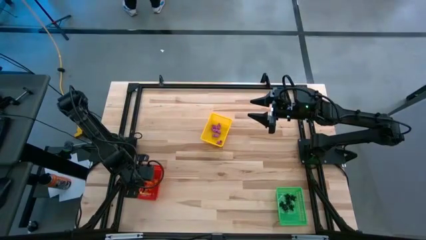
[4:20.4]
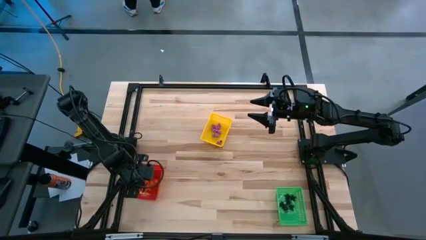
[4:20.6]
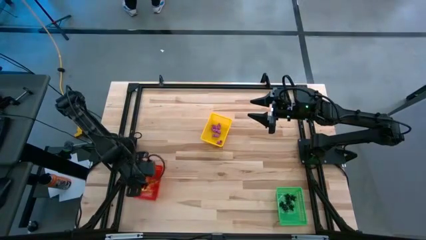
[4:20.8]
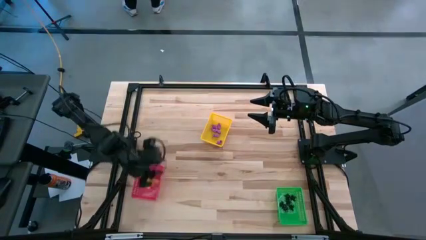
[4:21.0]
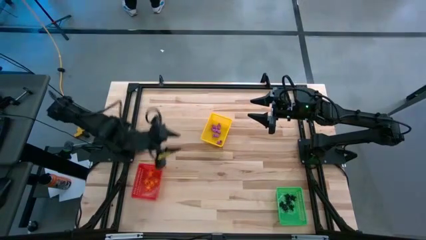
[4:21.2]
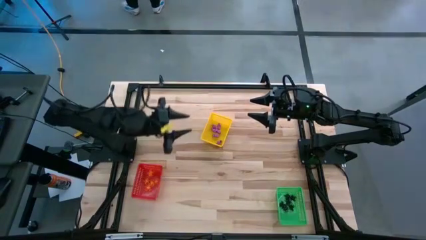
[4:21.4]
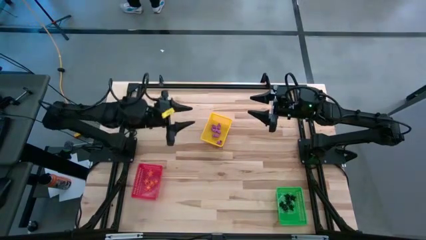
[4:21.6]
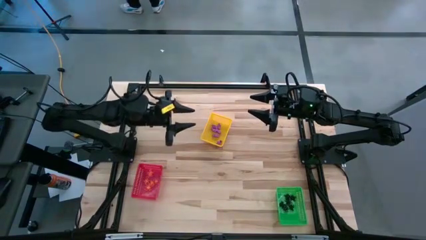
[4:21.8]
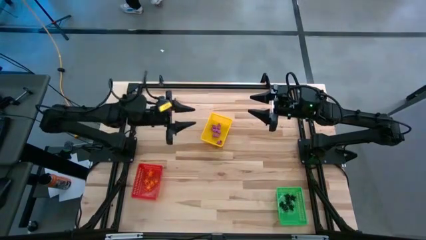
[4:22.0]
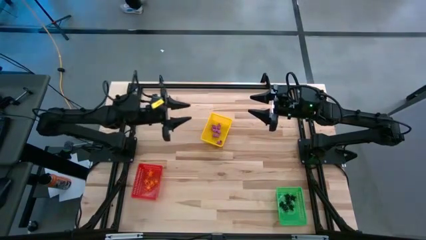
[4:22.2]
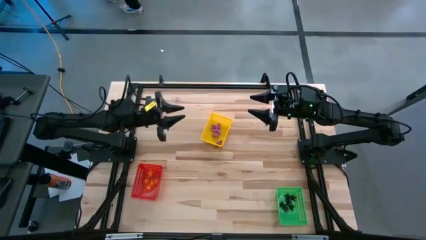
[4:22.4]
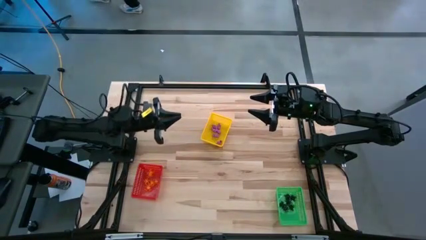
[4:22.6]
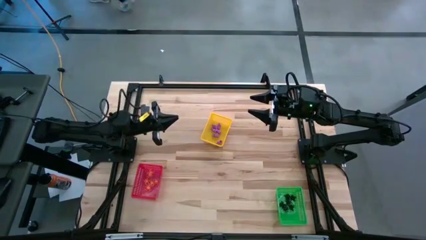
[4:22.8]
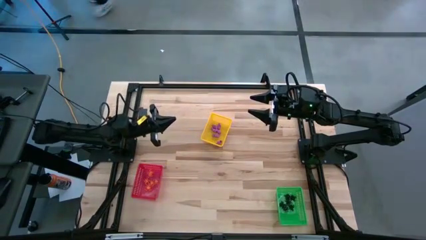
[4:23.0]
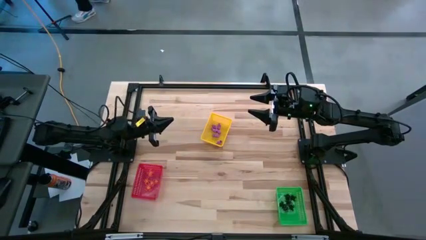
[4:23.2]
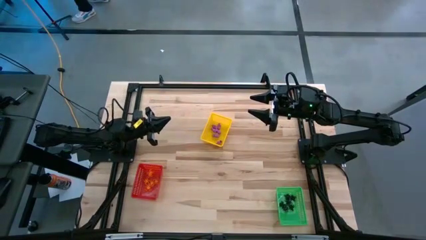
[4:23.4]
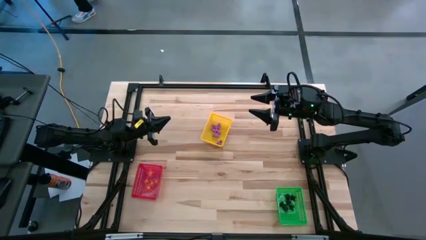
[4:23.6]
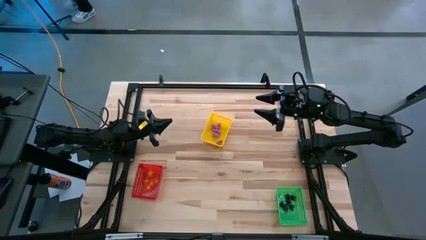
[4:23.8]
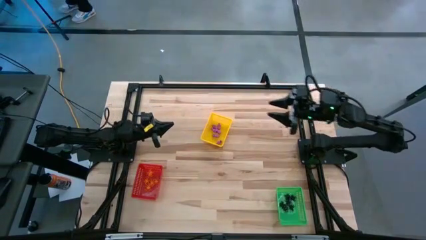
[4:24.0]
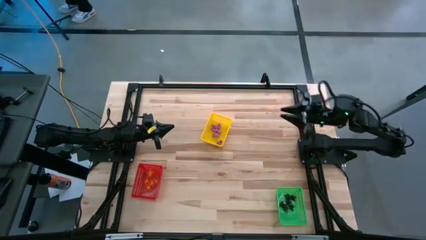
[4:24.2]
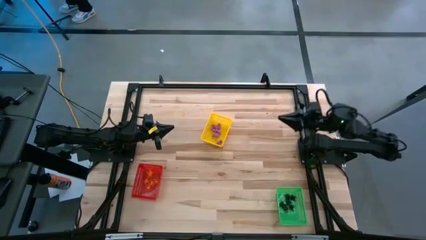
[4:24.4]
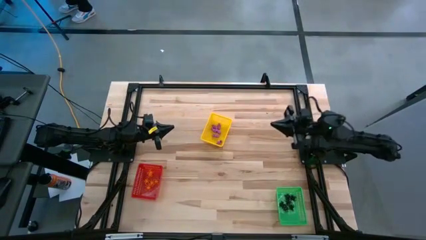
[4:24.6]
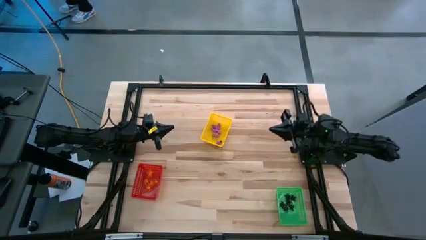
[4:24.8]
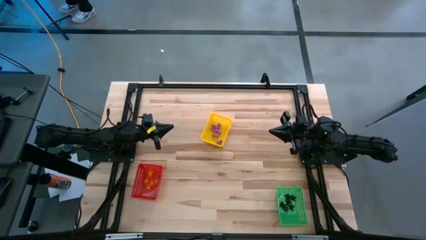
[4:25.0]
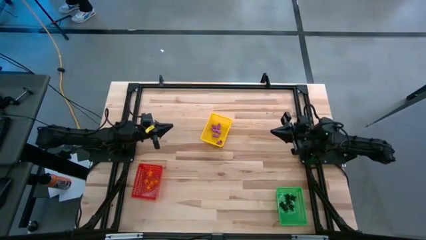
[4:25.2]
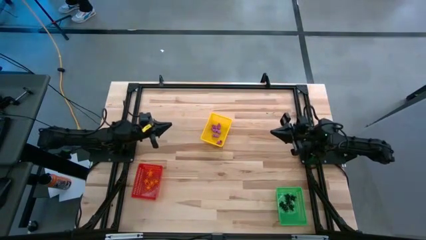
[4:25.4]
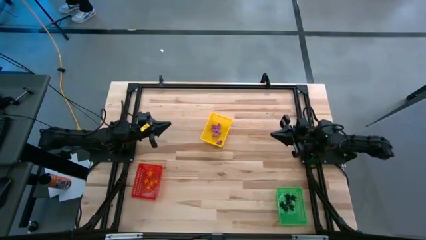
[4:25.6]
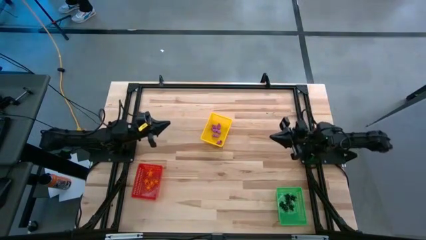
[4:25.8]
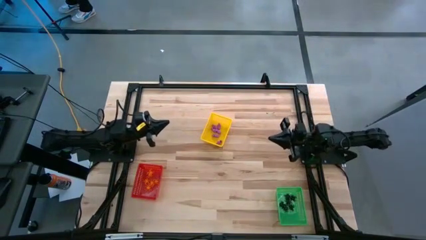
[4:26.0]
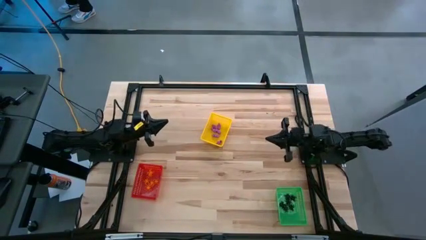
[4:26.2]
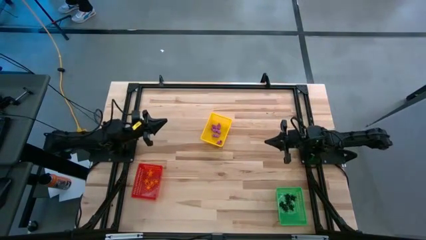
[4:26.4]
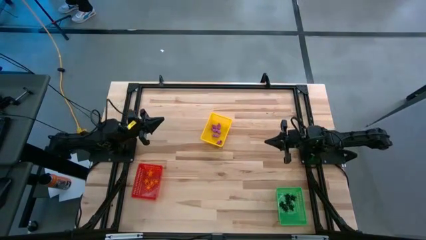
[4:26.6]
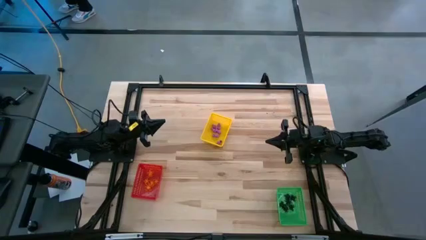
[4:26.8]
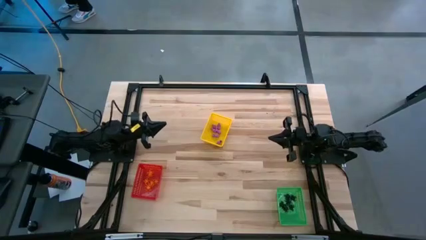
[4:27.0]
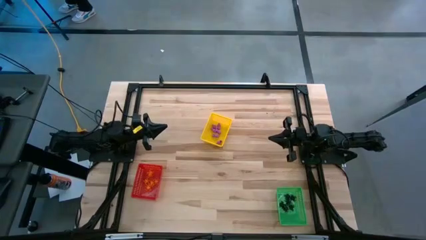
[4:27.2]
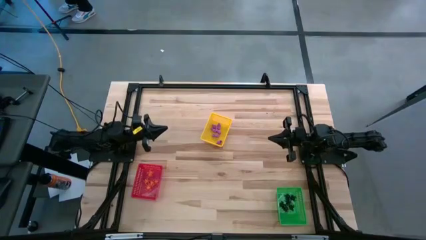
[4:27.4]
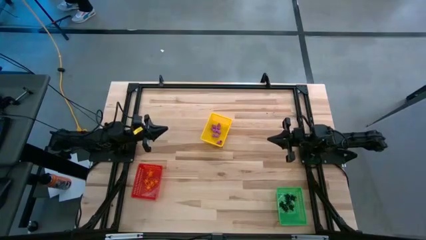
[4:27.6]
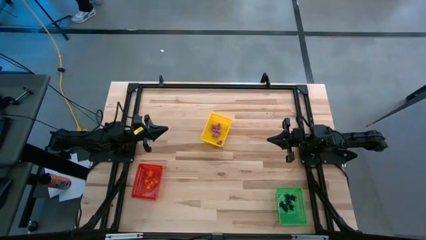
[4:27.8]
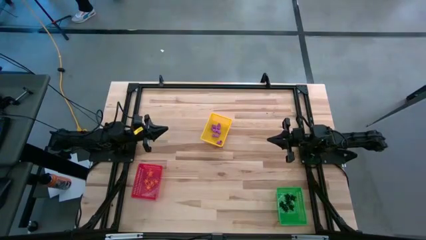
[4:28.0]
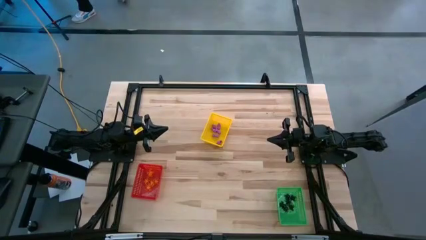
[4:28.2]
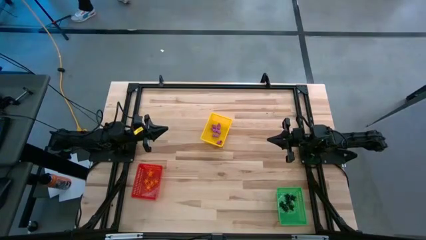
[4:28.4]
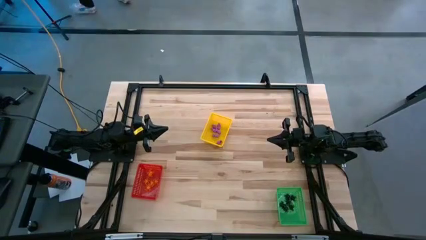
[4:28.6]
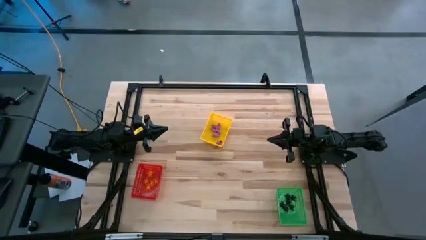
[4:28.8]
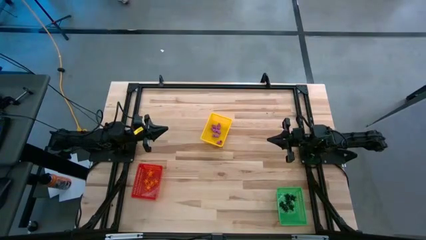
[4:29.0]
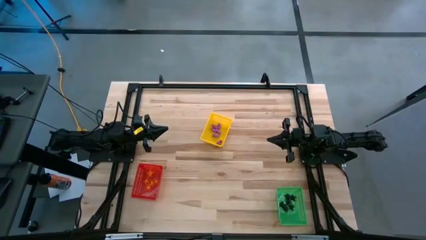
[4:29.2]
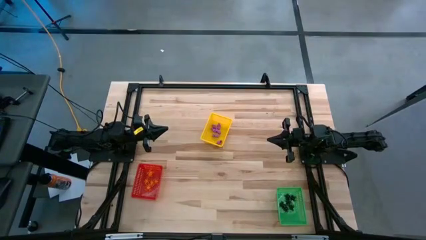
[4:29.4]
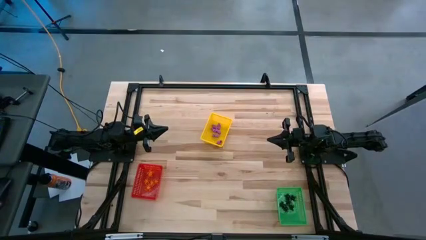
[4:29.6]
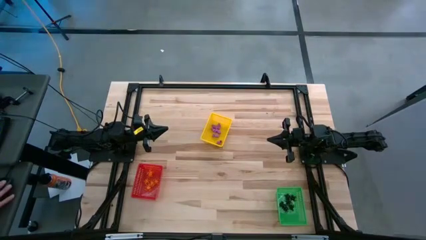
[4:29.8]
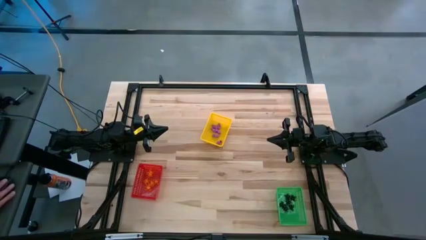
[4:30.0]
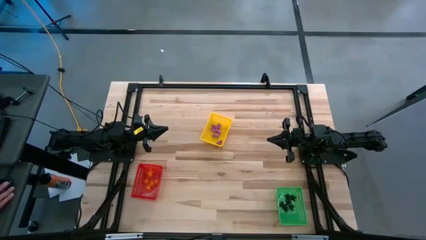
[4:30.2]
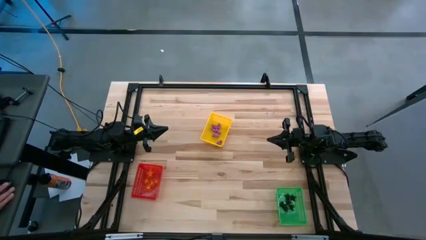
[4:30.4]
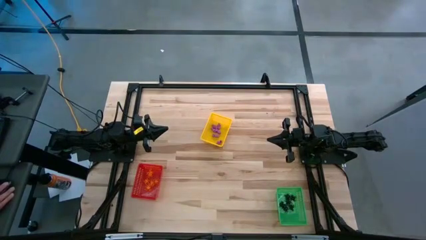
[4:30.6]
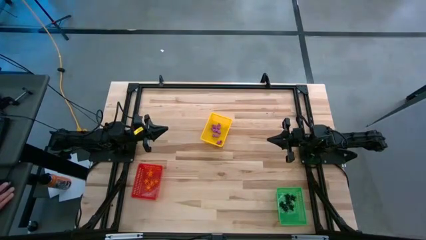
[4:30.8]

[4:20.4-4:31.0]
Task: Sort Halloween decoration
Return to Home Position
